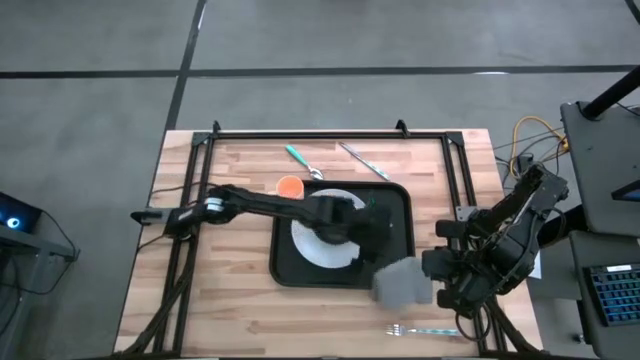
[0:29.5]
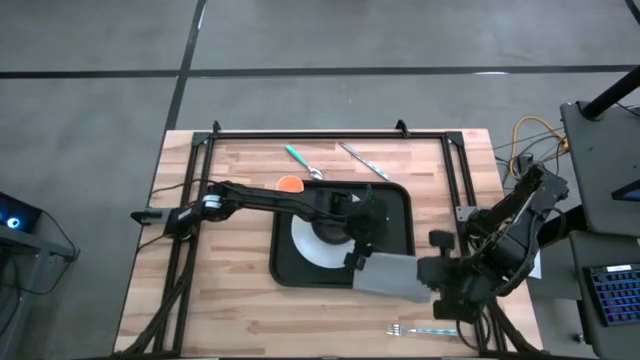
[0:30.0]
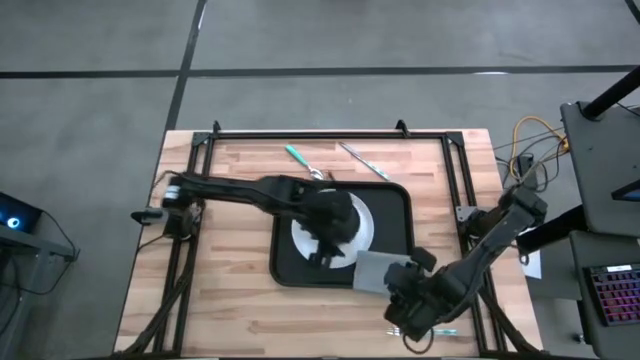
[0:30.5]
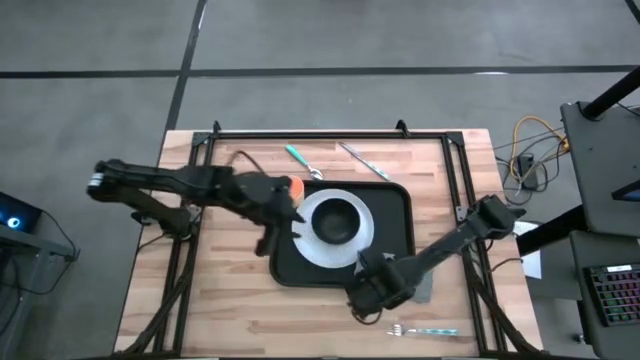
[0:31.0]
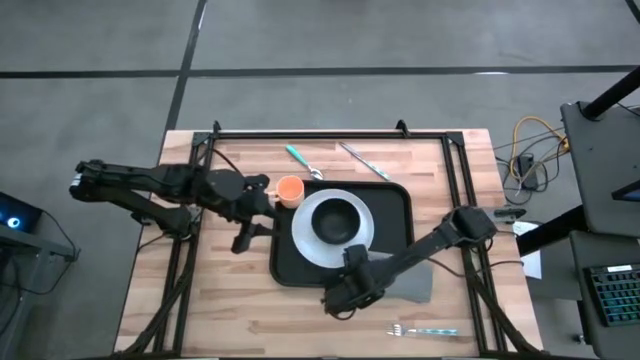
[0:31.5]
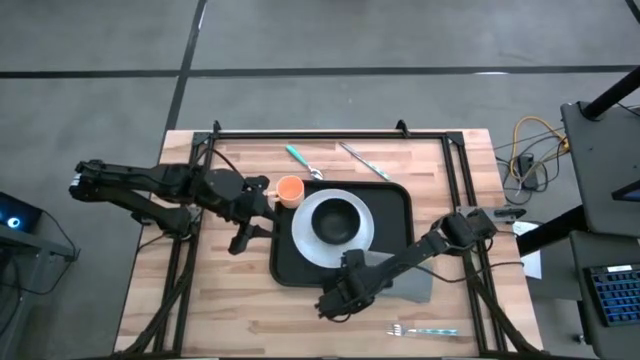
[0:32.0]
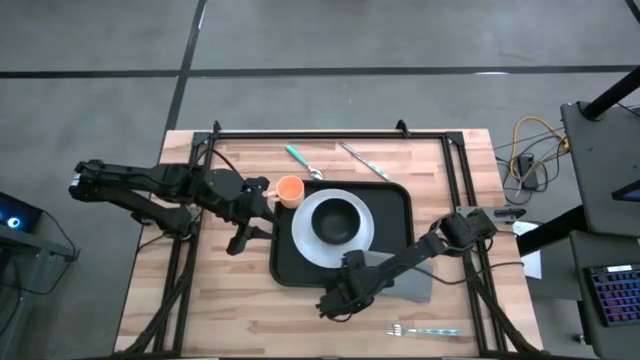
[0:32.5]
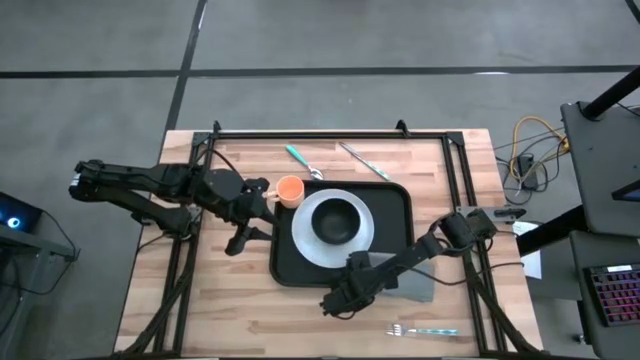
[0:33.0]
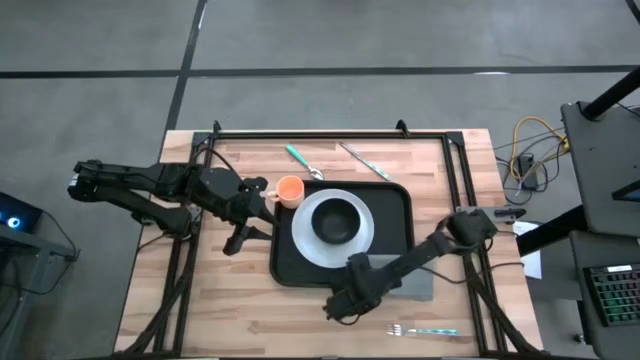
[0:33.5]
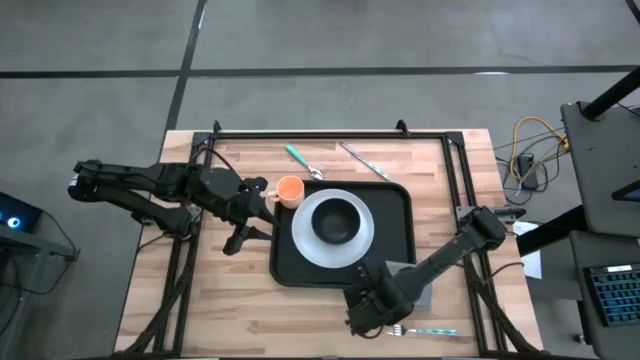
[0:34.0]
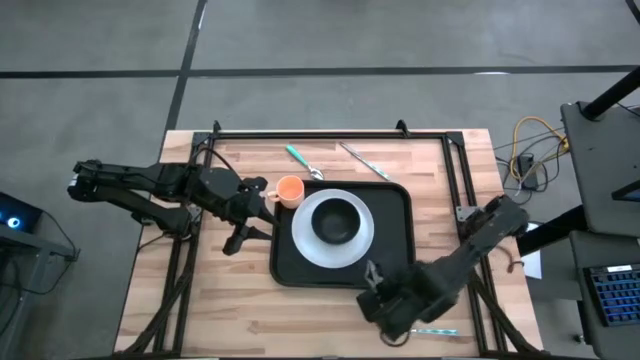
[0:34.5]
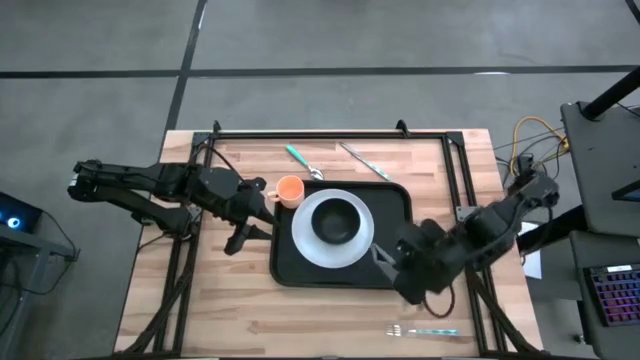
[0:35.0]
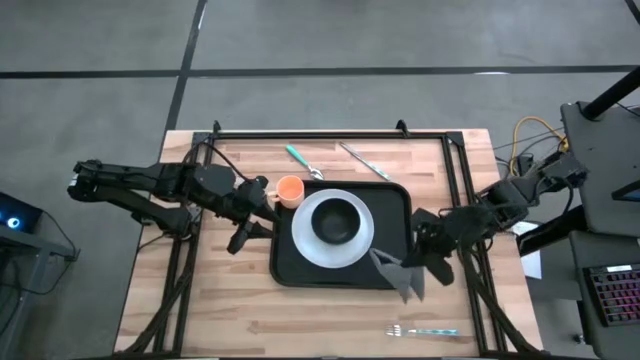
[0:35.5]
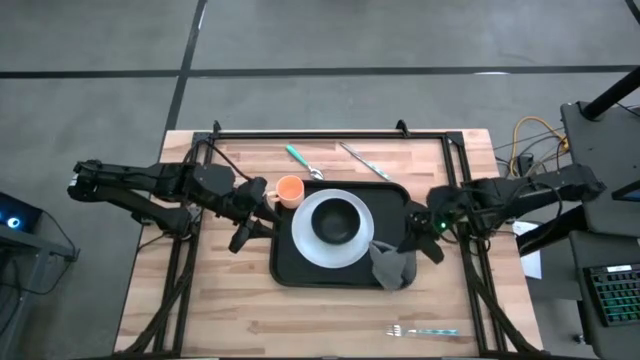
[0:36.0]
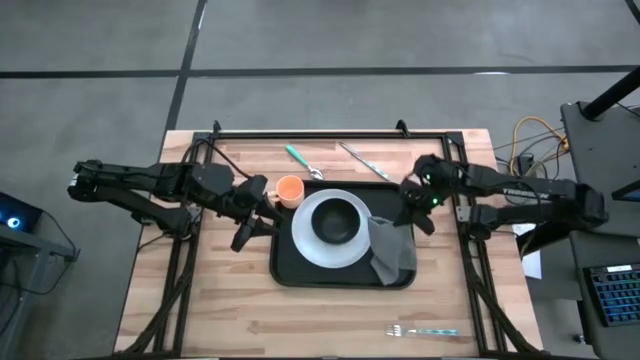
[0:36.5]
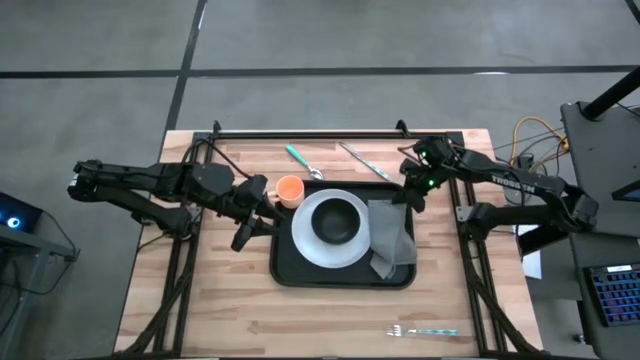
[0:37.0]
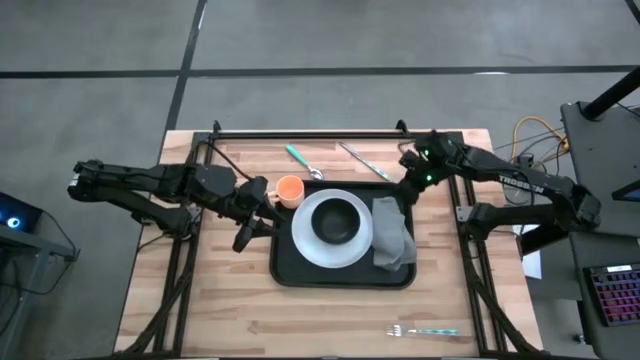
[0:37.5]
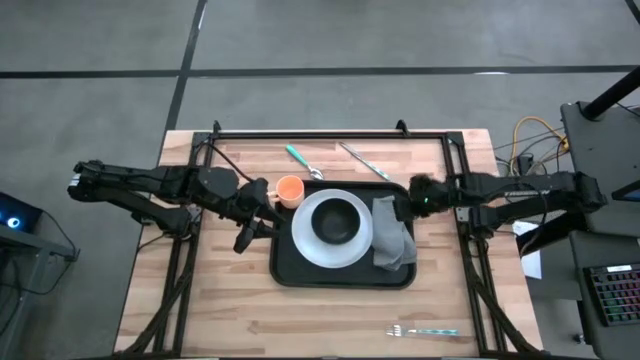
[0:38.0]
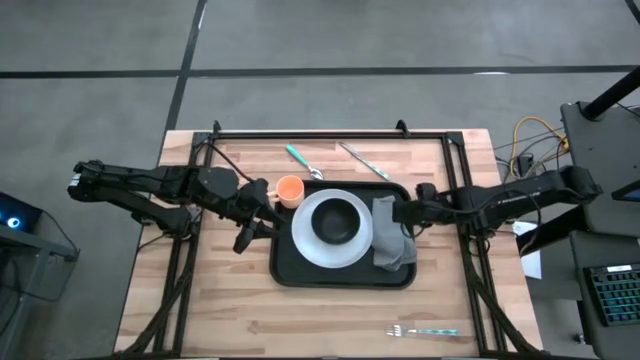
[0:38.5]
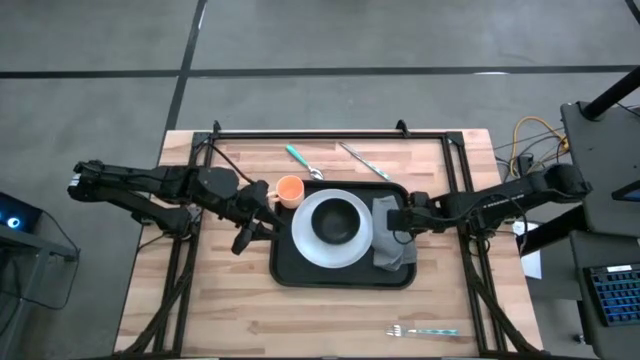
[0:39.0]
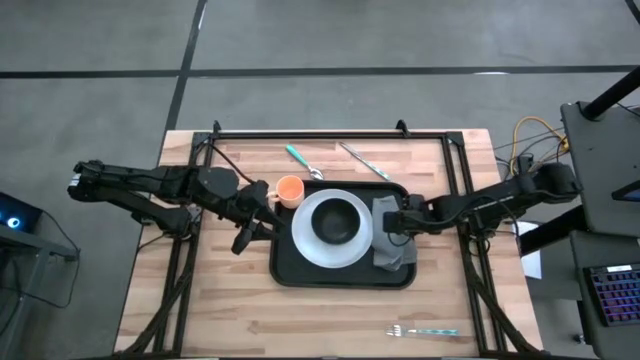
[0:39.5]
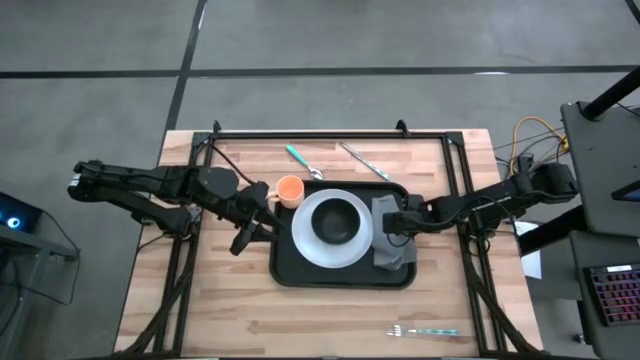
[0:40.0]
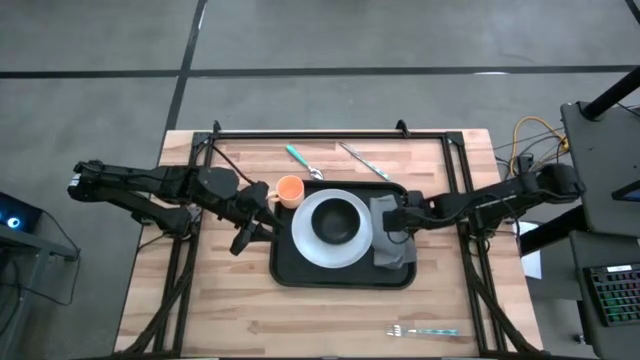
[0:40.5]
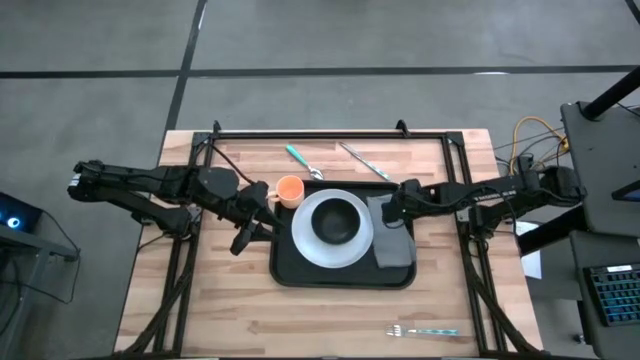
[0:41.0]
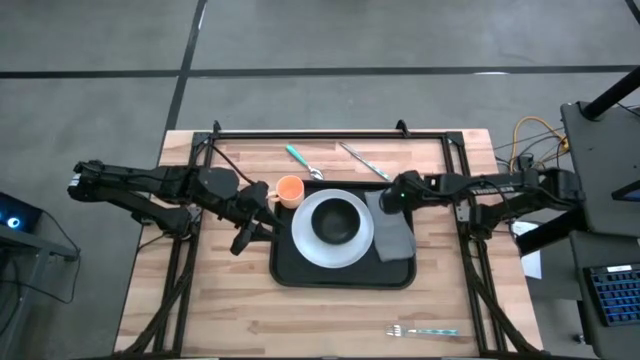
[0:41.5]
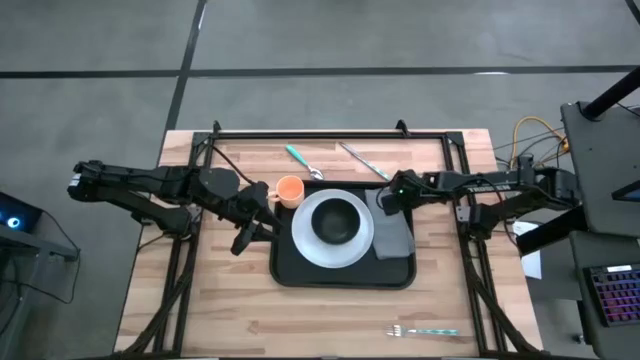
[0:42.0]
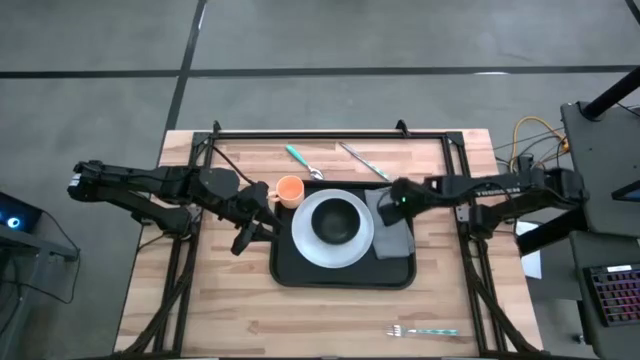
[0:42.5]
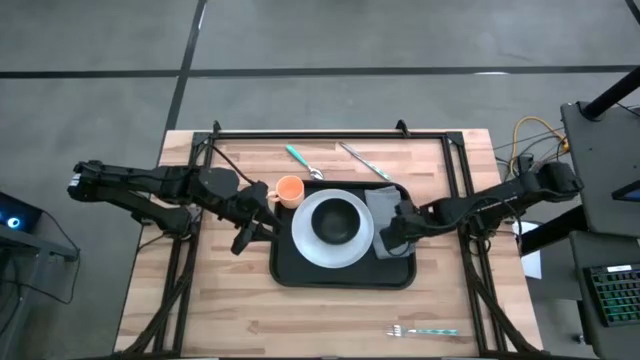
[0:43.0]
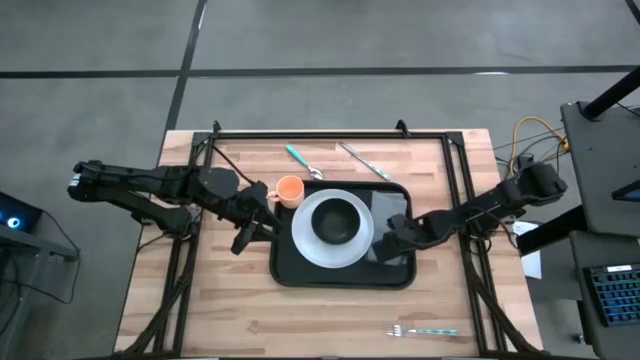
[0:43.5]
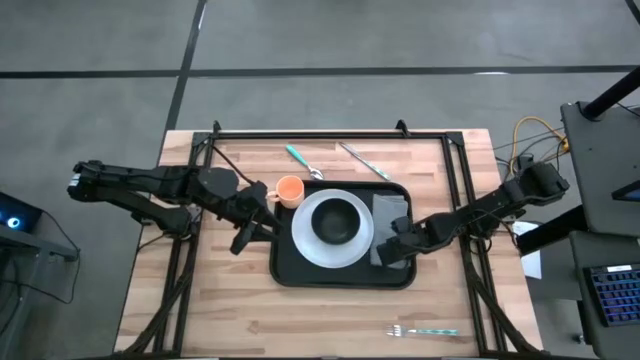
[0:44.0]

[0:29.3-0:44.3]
Task: Set up tray
Put the gray napkin on the black serving tray to the right of the white plate

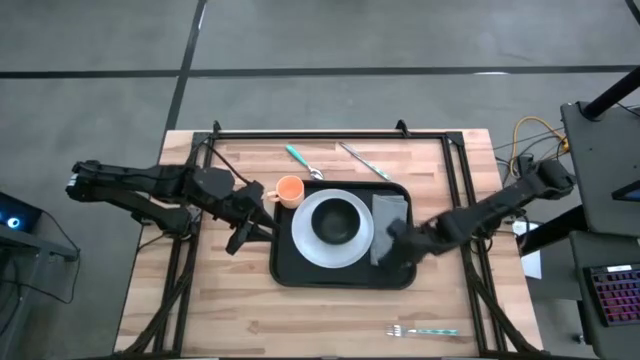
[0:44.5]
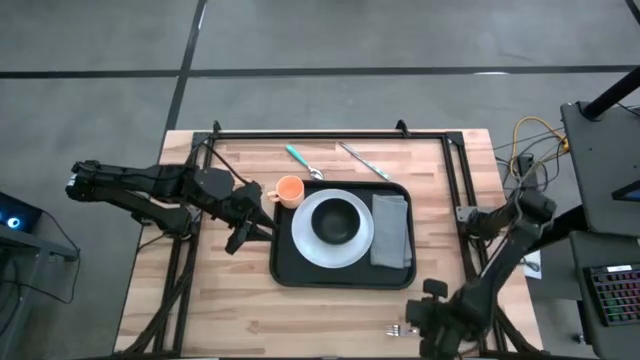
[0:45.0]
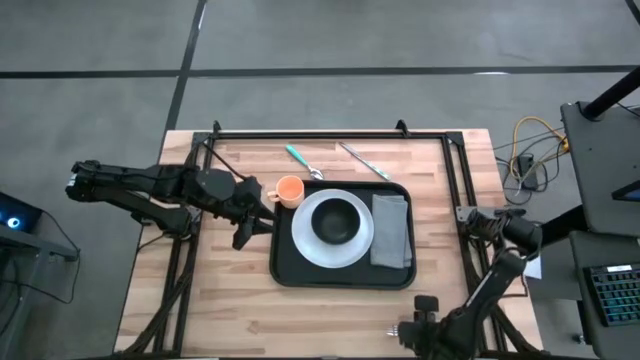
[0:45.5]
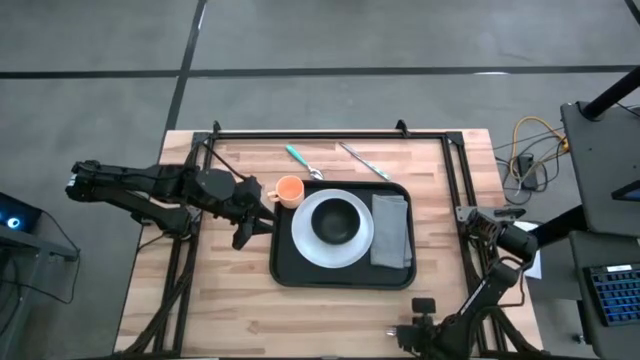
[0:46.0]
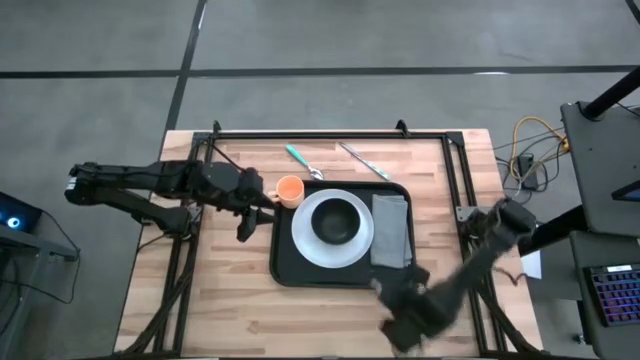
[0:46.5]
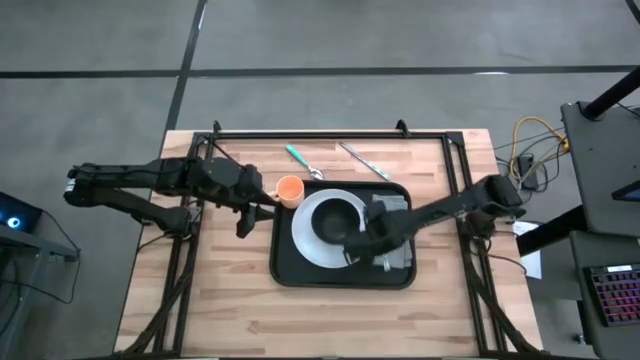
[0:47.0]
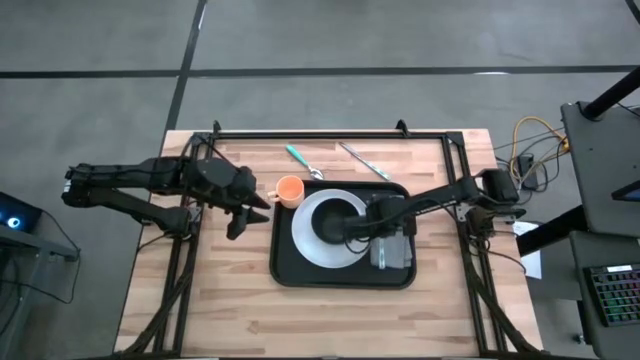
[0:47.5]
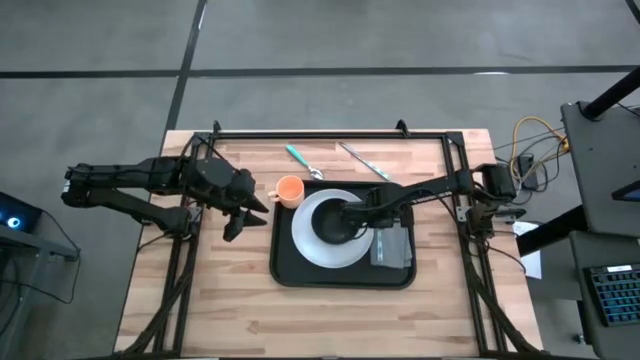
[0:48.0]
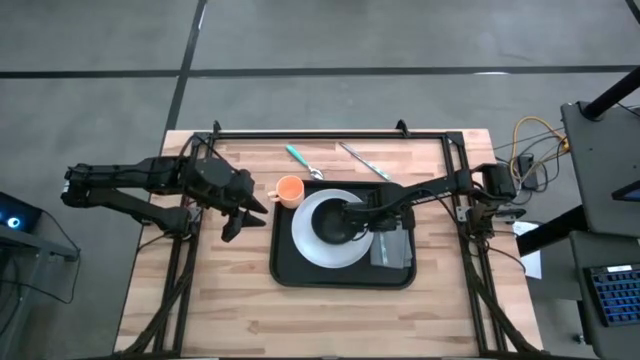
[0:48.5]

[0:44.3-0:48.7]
Put the blue fork on the gray napkin

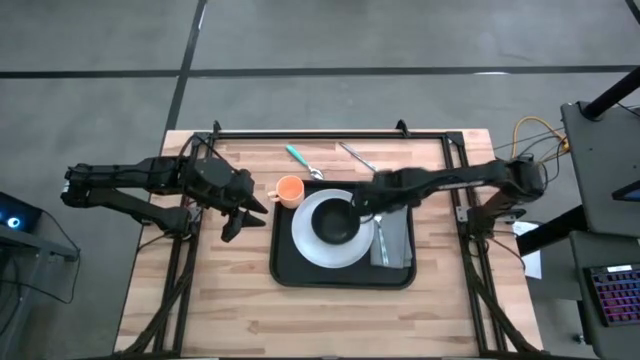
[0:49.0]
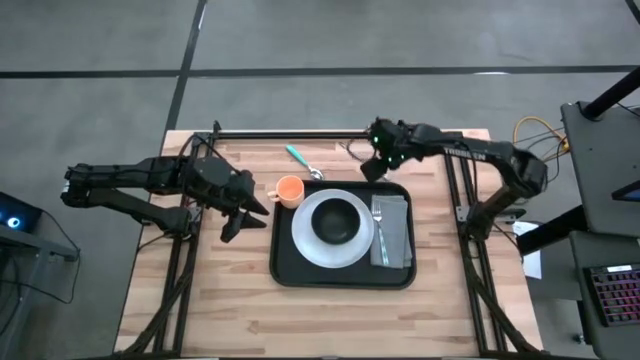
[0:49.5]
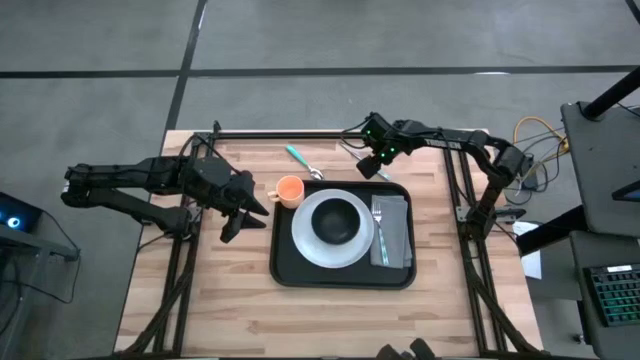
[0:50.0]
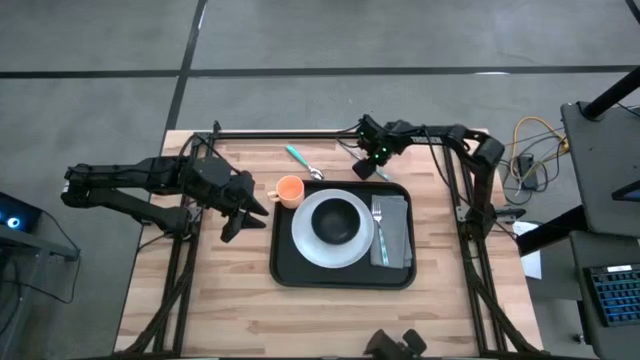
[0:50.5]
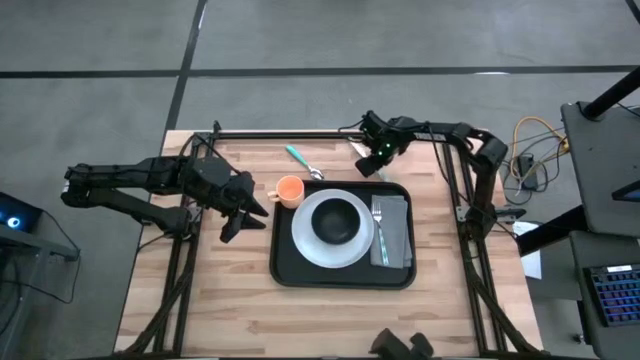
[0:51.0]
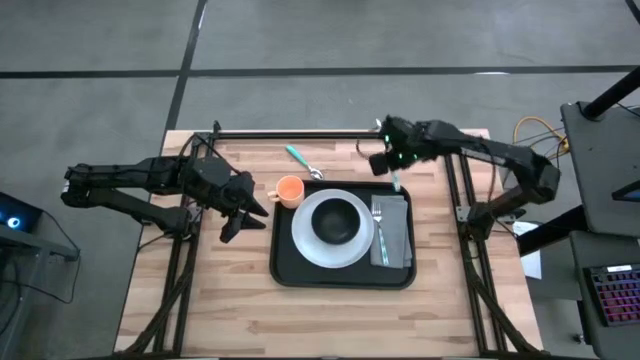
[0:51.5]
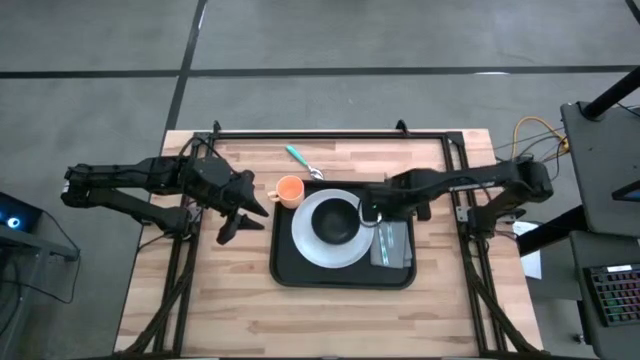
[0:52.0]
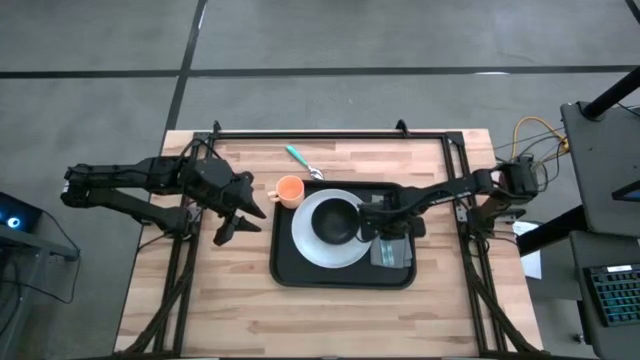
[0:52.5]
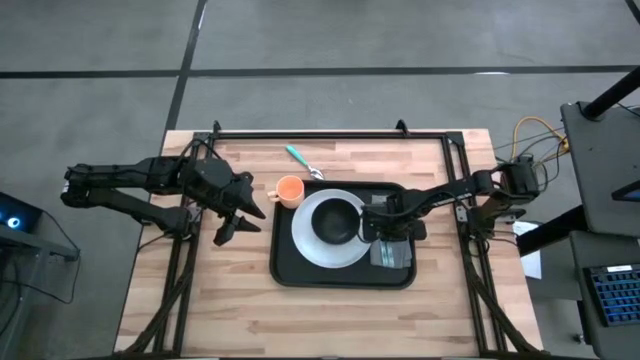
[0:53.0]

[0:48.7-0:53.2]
Put the blue knife on the gray napkin to the right of the blue fork
